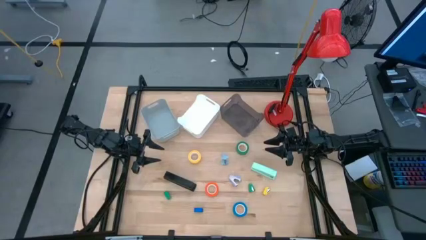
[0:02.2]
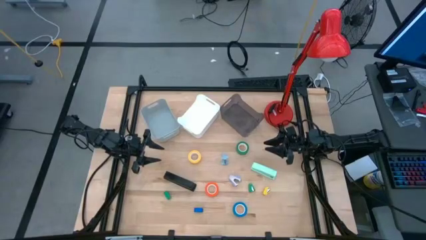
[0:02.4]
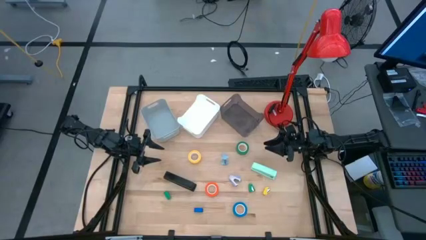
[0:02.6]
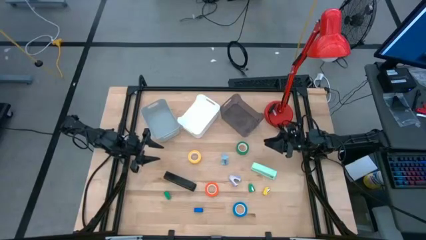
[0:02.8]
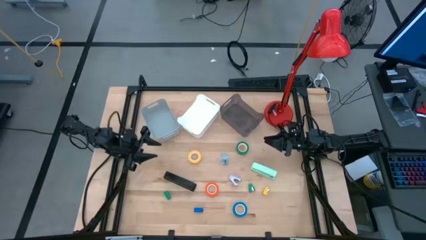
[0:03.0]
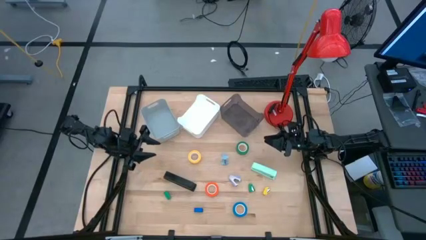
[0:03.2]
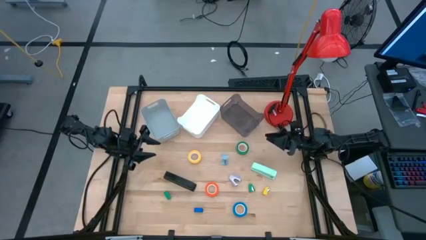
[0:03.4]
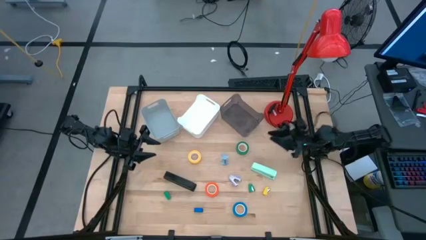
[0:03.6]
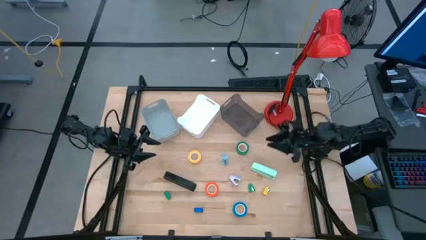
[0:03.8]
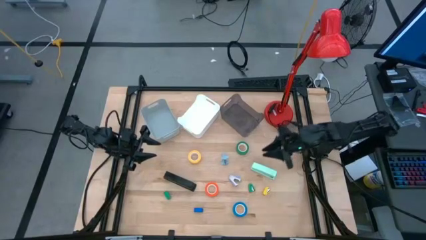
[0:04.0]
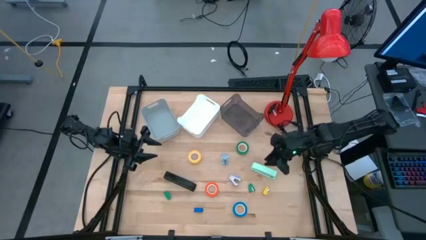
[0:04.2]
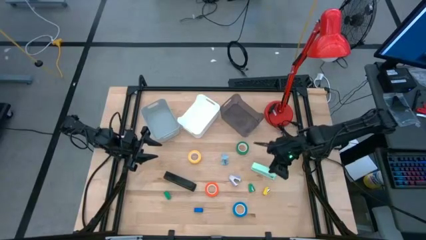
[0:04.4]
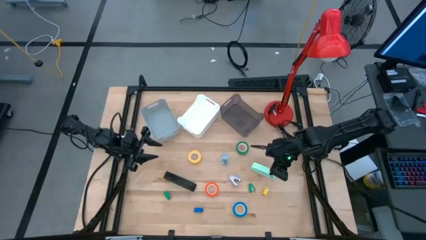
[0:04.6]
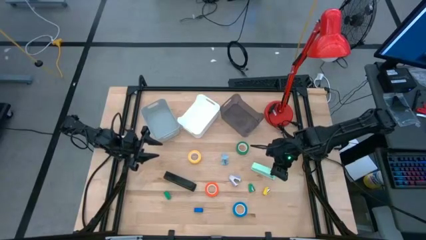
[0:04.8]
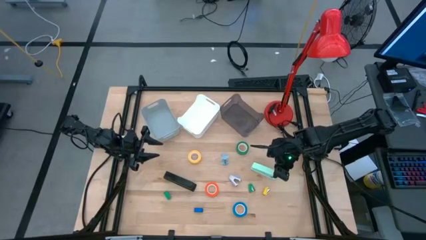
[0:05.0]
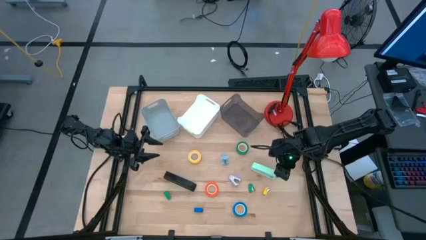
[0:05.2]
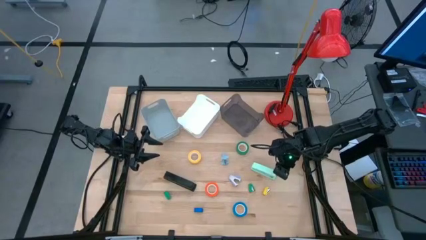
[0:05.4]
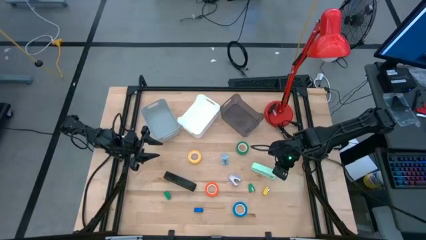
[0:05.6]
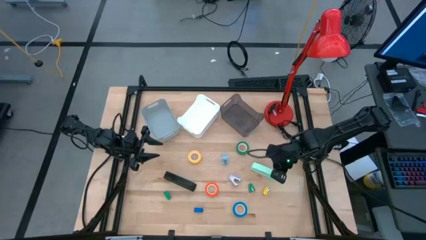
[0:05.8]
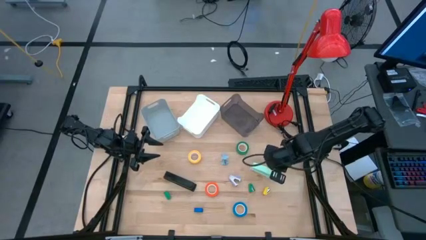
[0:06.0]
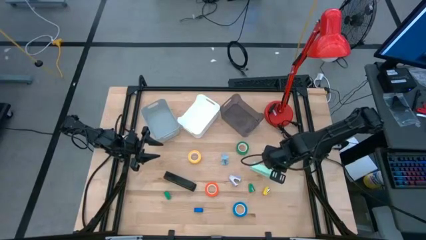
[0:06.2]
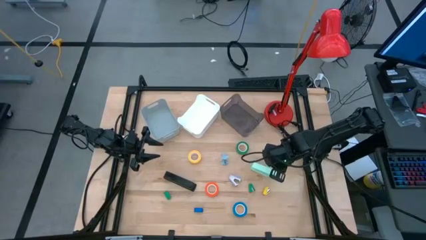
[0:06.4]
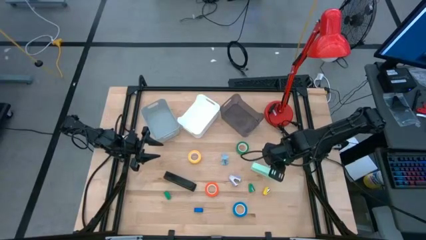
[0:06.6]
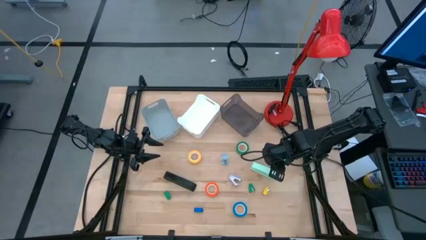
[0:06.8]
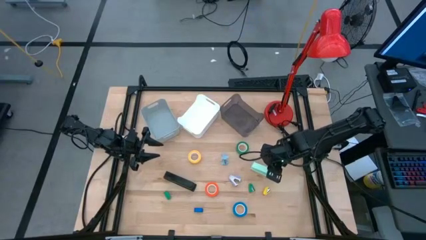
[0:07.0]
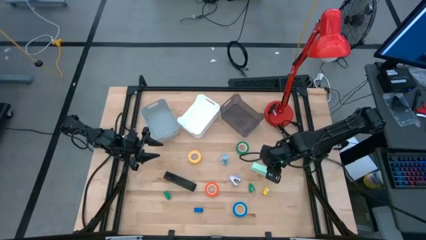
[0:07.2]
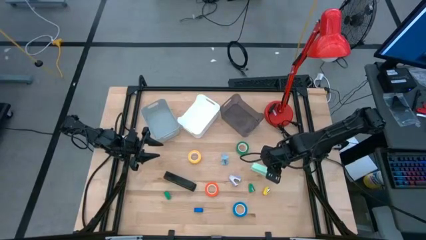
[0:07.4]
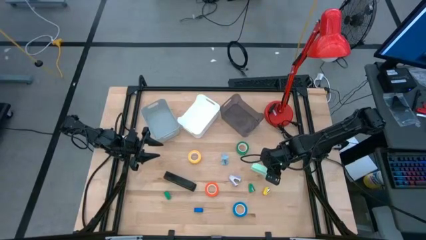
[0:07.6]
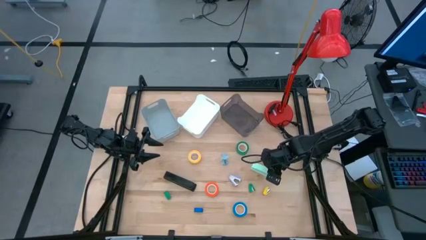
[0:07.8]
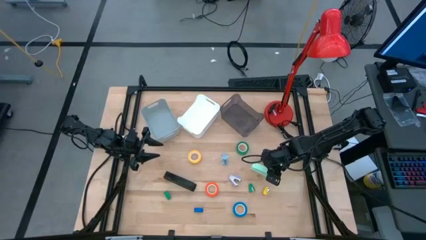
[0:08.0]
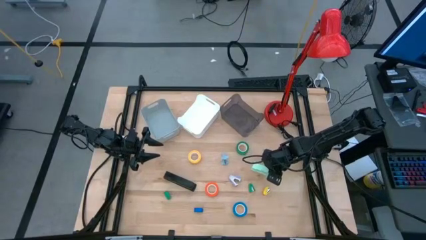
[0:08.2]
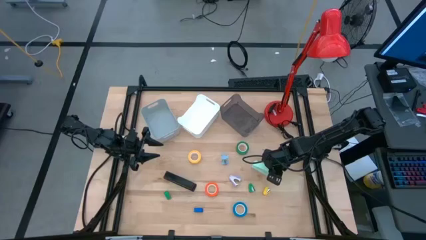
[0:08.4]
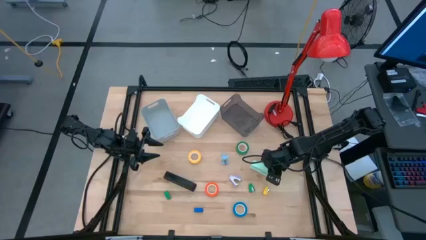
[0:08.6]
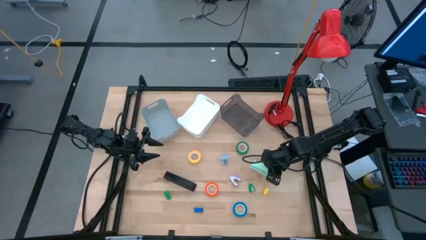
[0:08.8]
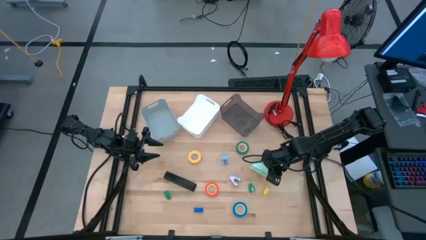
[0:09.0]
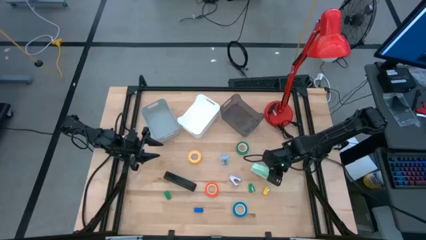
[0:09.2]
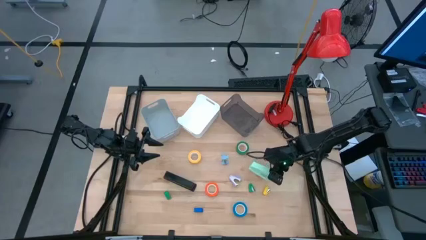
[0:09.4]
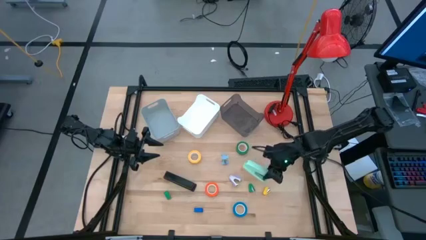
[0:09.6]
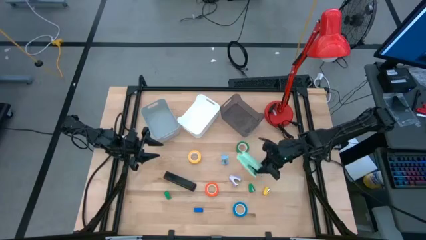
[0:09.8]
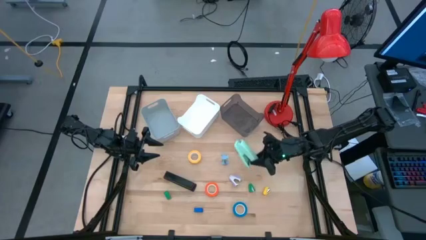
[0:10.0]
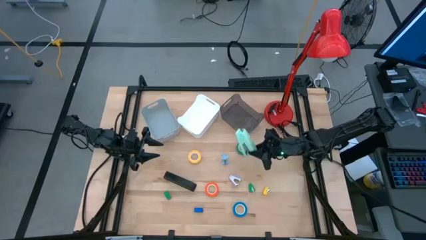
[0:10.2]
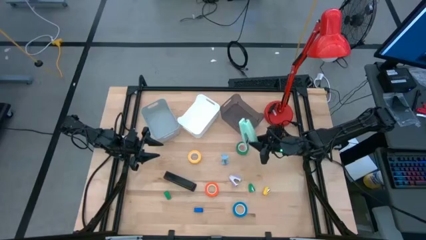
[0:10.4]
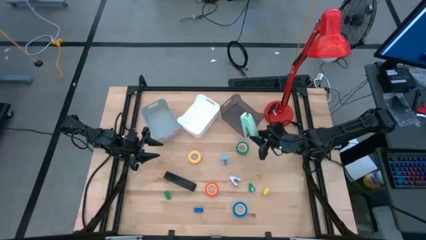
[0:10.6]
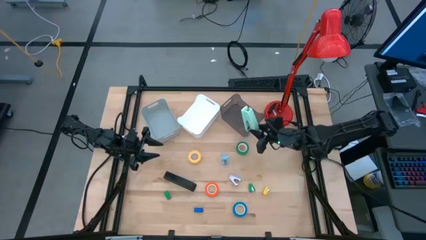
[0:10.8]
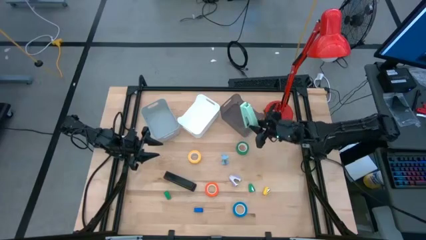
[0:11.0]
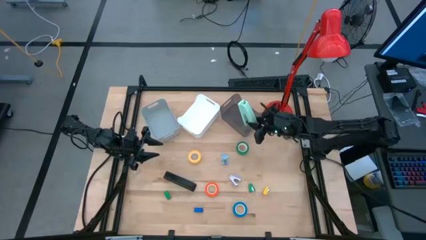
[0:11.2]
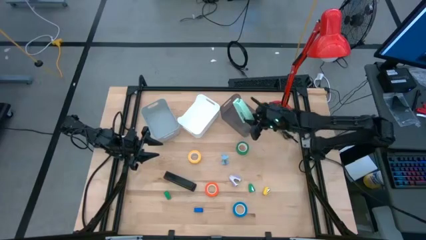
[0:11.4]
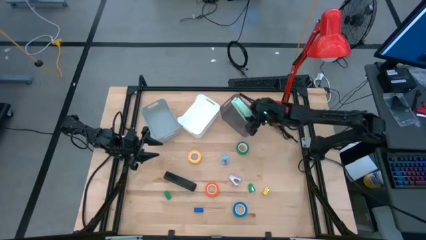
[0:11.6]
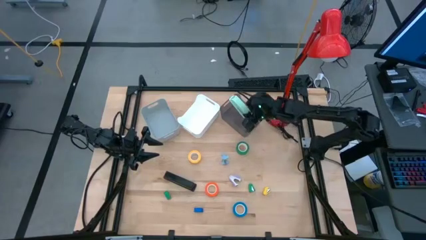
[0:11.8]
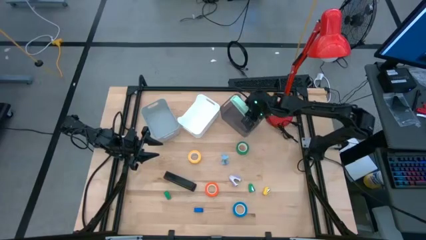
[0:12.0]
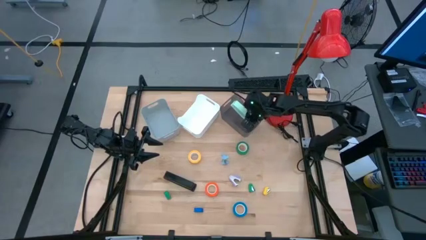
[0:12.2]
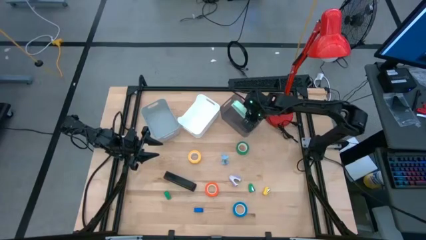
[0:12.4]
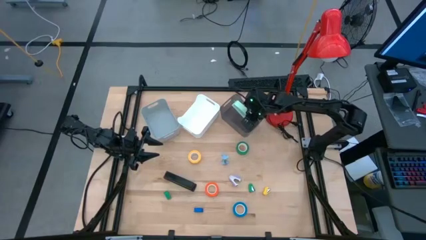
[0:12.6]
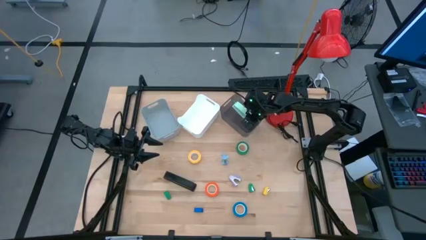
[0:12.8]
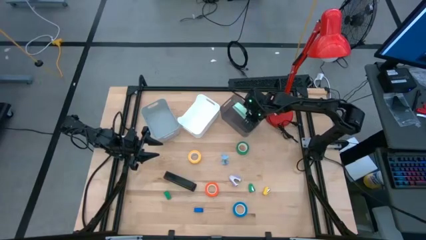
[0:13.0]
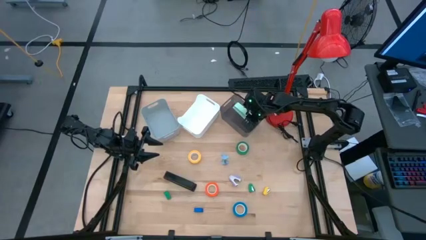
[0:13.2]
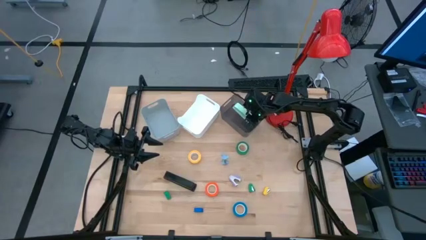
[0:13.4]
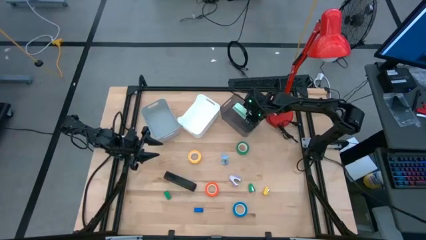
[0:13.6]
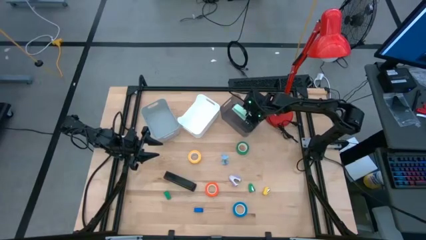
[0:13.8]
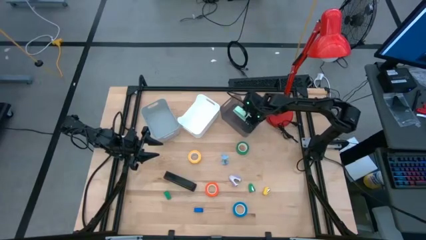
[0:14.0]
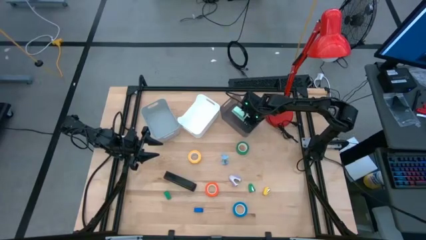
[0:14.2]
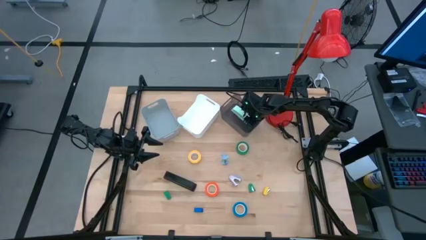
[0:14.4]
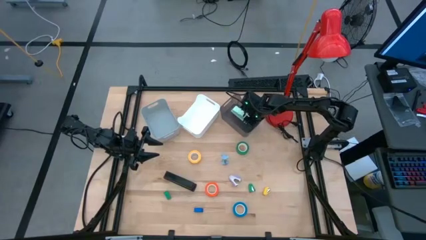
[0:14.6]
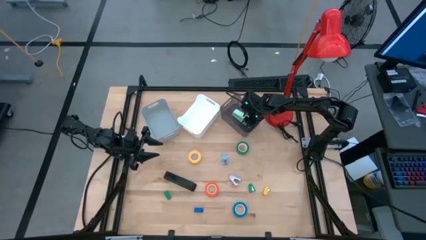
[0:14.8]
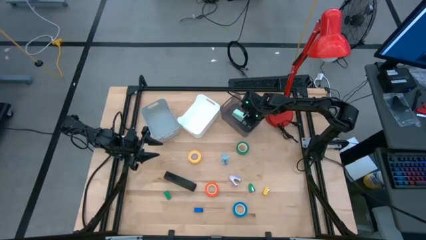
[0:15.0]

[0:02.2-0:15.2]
Task: Pick and place Stapler, Stapler remover, tape
Put the big light green stapler into the black bin

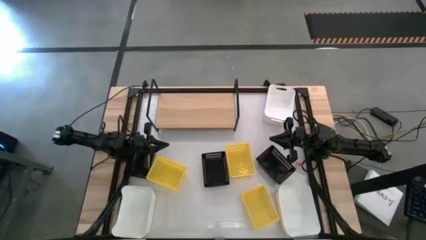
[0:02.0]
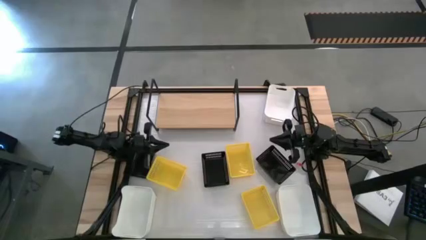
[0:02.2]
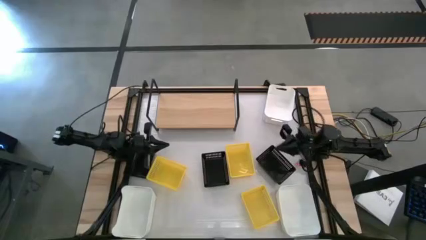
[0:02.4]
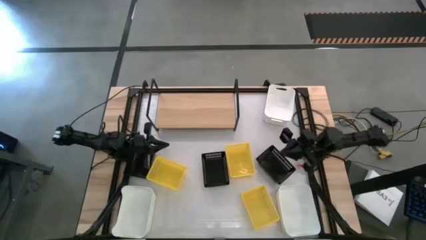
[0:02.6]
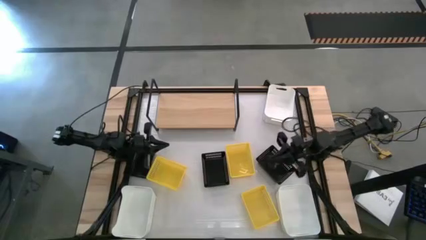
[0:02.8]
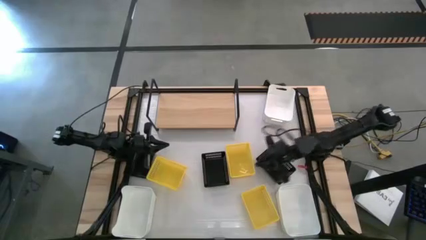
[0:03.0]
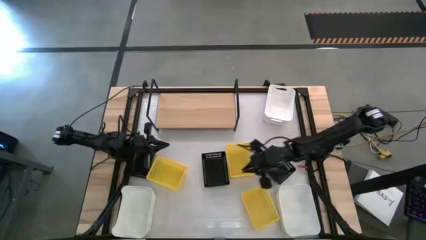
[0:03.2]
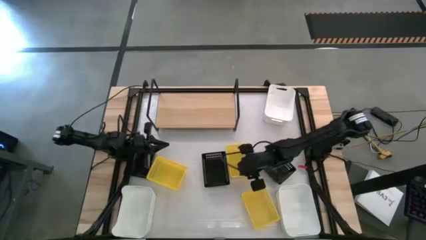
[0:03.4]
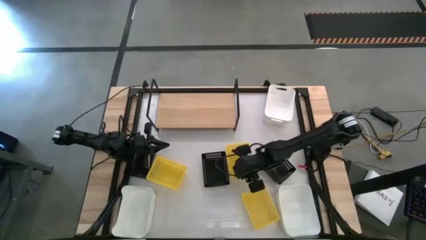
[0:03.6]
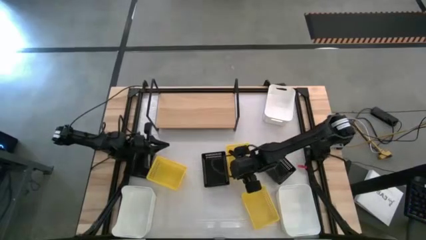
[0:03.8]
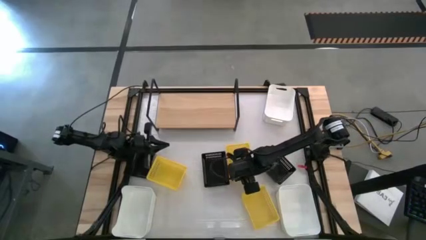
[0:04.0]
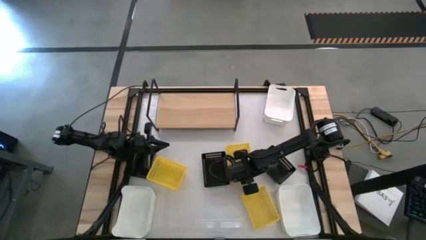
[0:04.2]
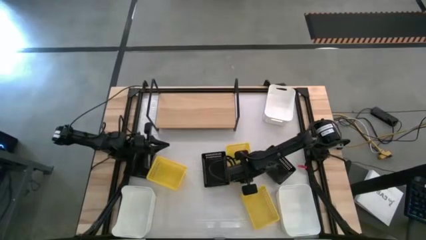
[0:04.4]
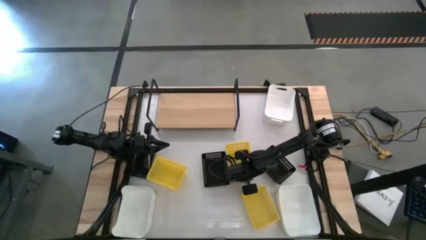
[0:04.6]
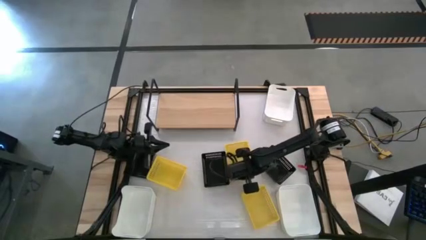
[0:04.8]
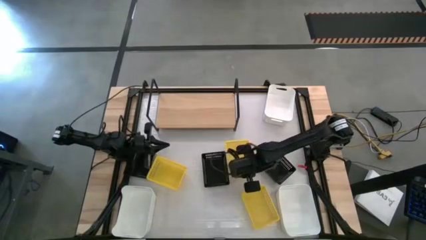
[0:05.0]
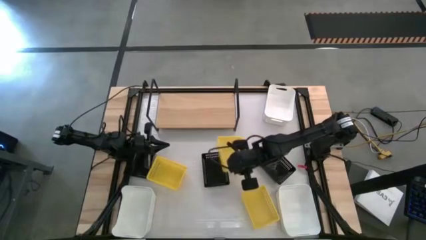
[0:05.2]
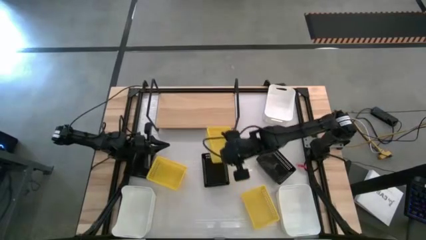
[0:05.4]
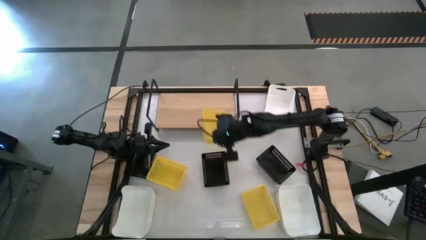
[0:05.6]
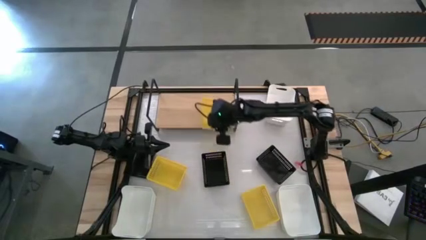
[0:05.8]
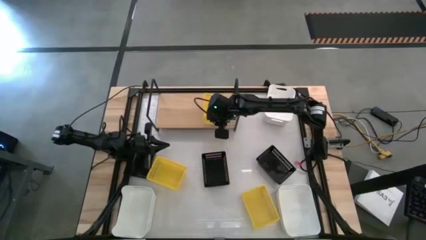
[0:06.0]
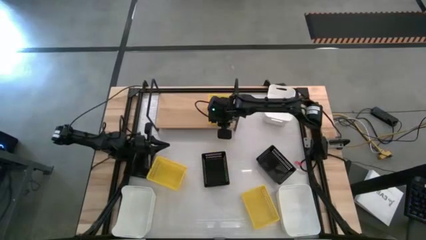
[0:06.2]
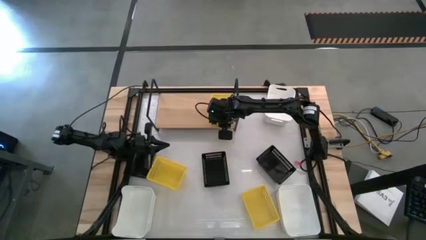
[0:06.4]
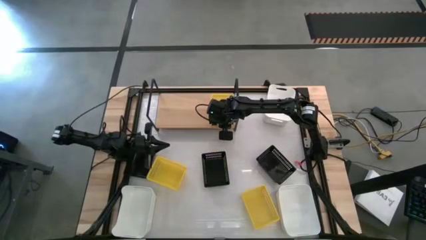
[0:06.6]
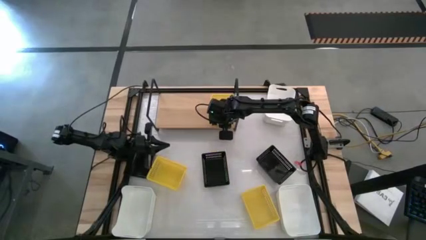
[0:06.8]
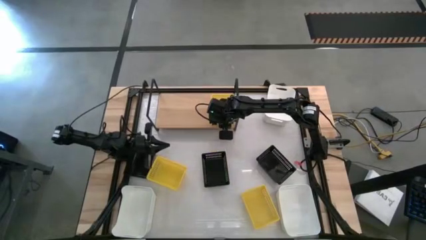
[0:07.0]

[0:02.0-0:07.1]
Task: Stack baskets on shelf by color
Put the top right yellow bin on the shelf
